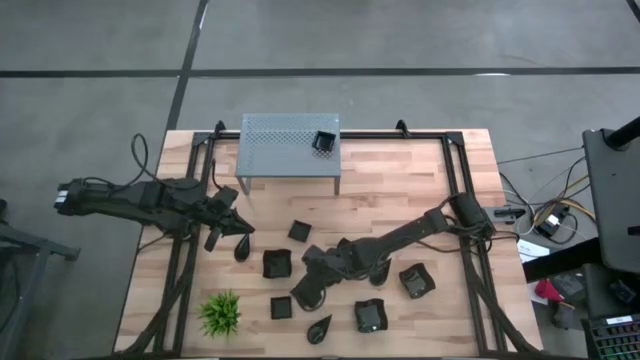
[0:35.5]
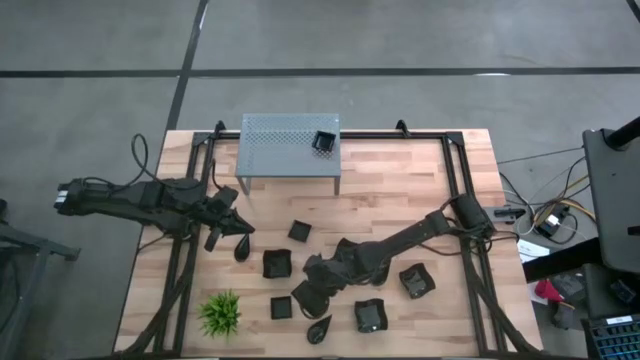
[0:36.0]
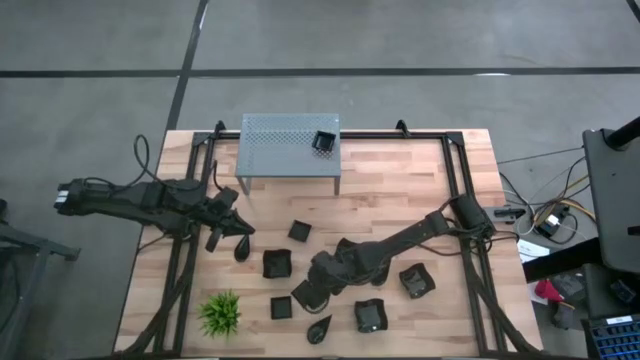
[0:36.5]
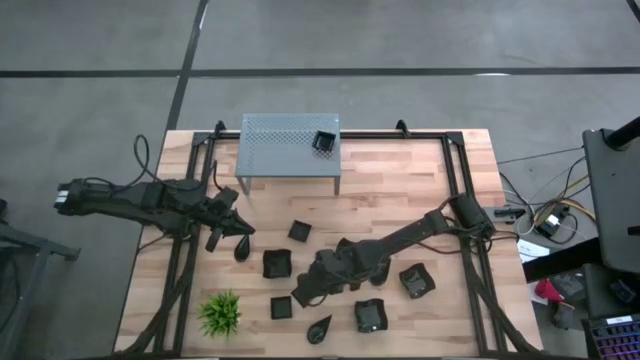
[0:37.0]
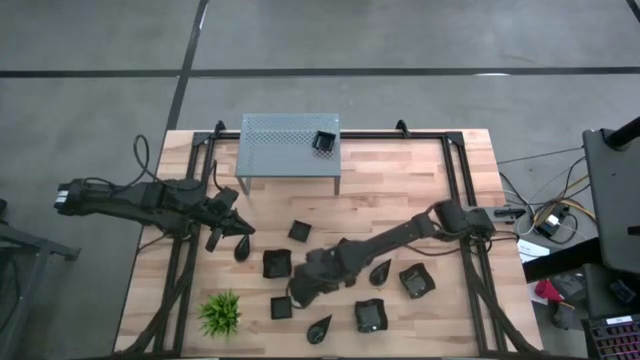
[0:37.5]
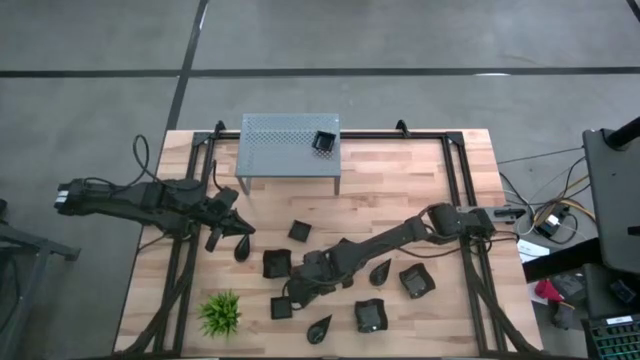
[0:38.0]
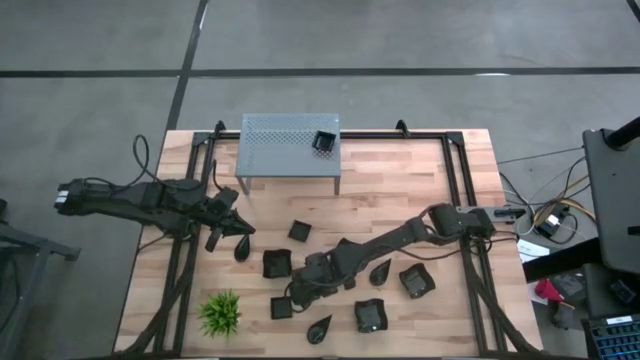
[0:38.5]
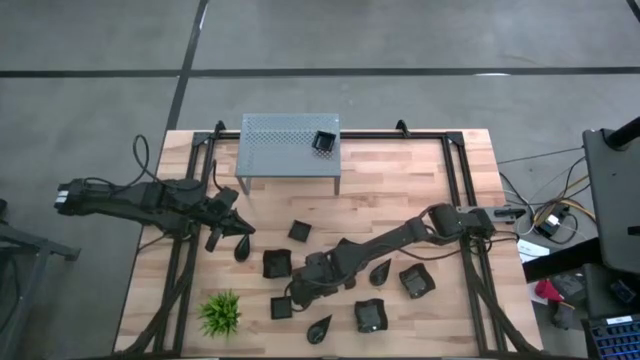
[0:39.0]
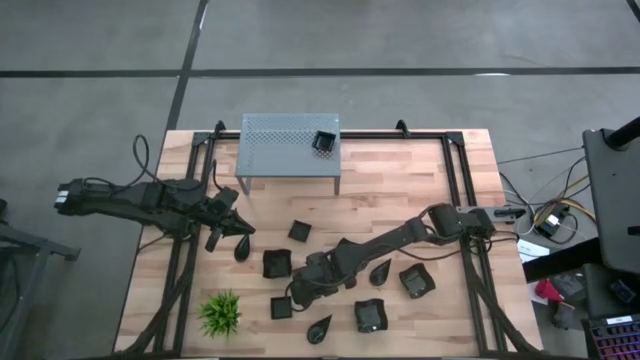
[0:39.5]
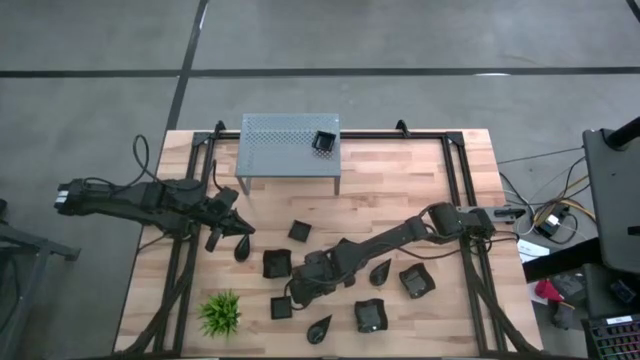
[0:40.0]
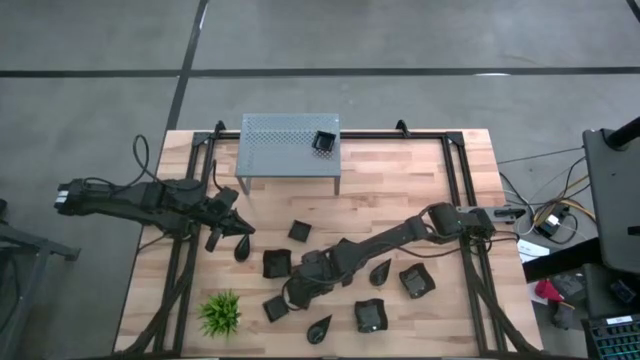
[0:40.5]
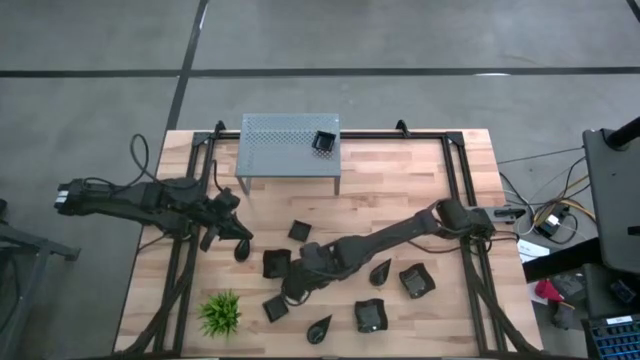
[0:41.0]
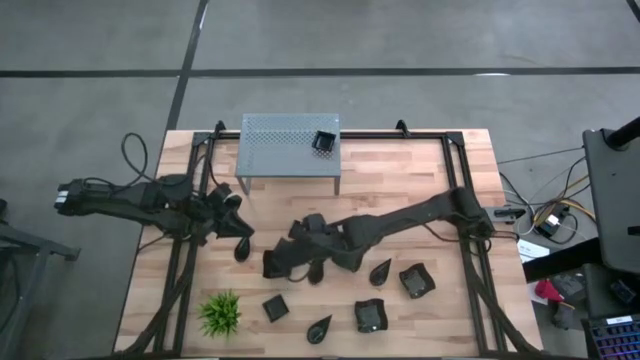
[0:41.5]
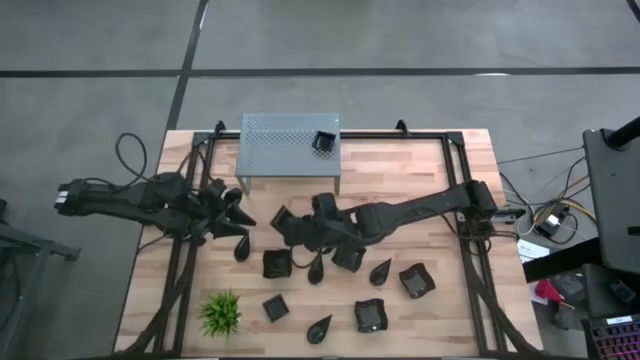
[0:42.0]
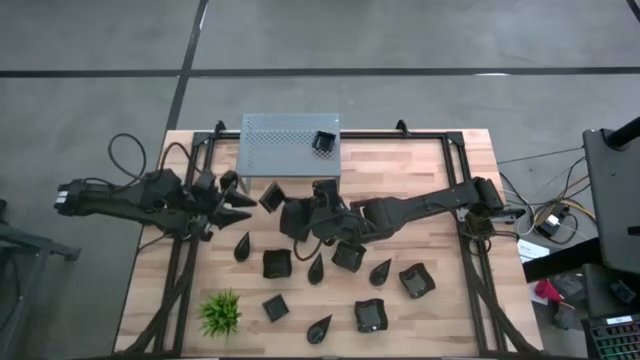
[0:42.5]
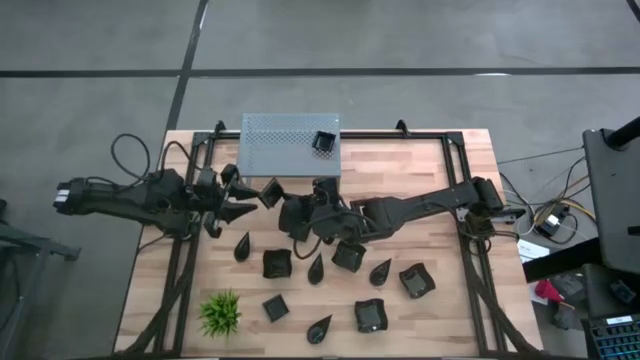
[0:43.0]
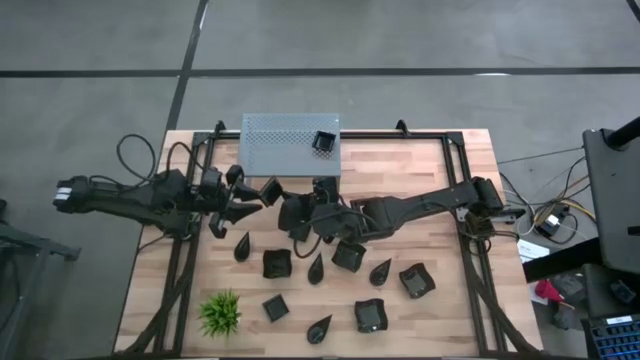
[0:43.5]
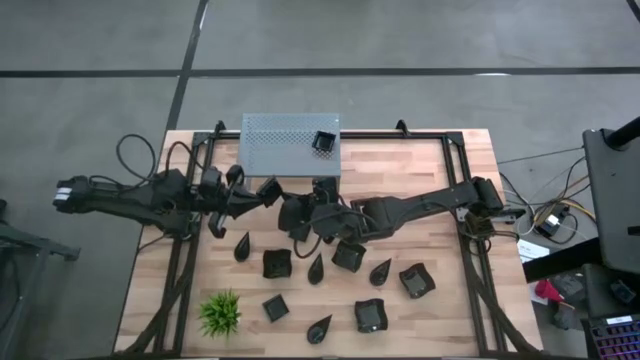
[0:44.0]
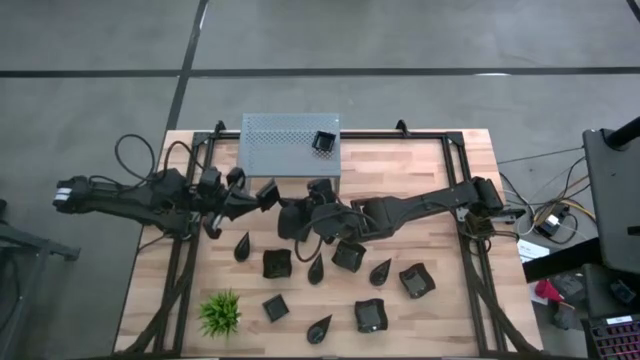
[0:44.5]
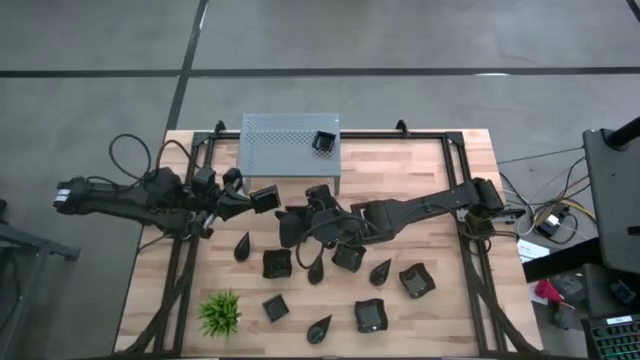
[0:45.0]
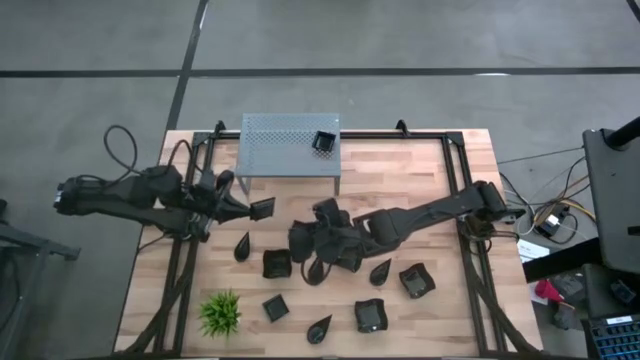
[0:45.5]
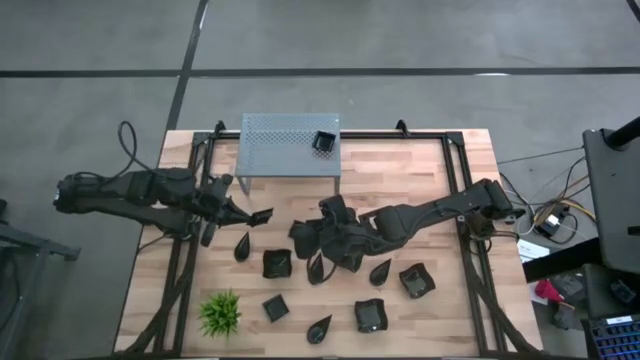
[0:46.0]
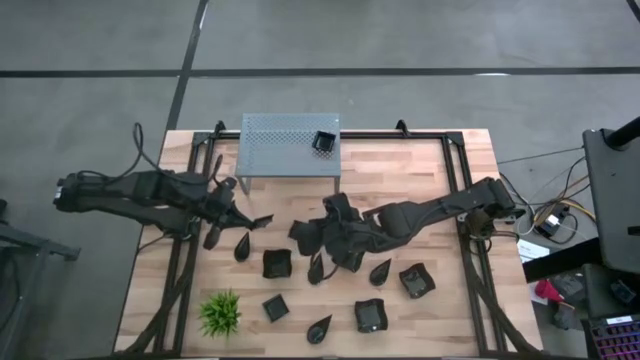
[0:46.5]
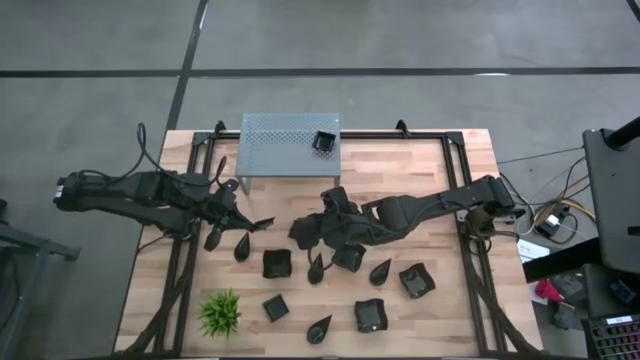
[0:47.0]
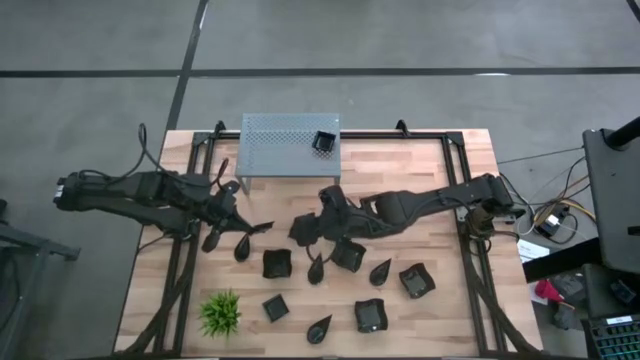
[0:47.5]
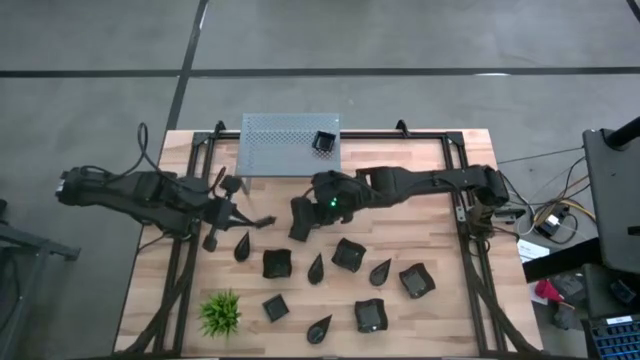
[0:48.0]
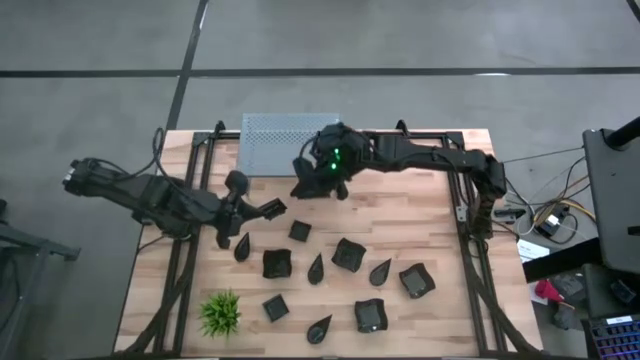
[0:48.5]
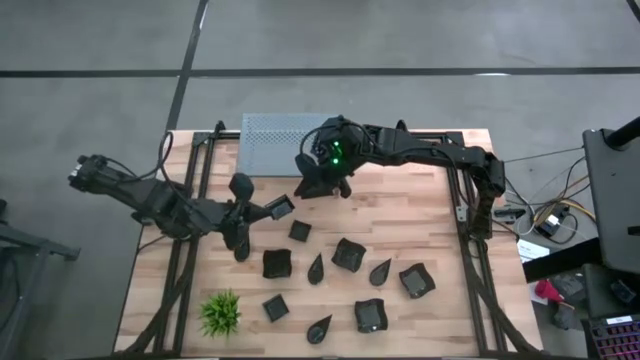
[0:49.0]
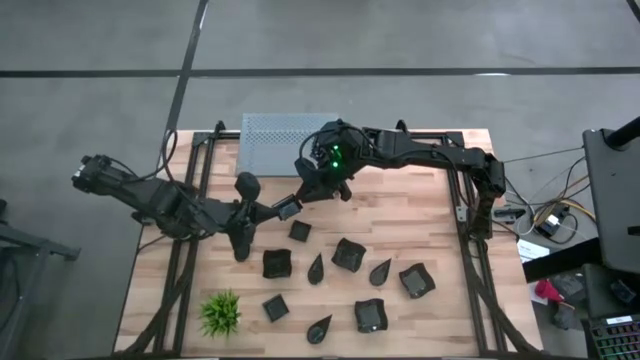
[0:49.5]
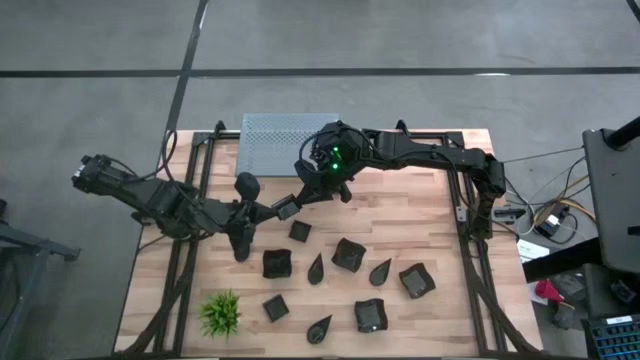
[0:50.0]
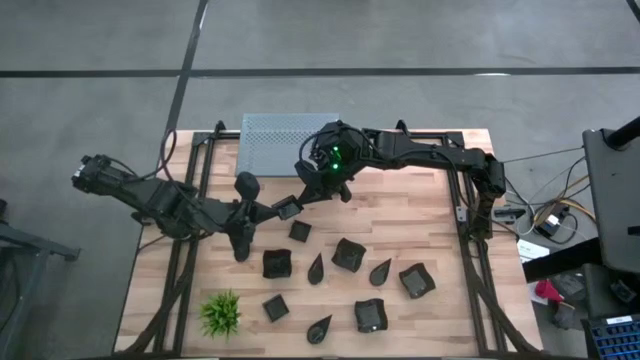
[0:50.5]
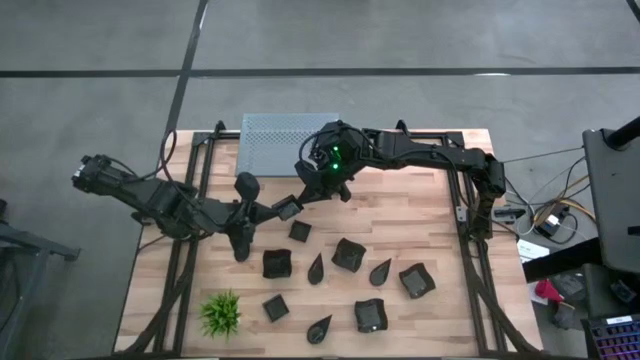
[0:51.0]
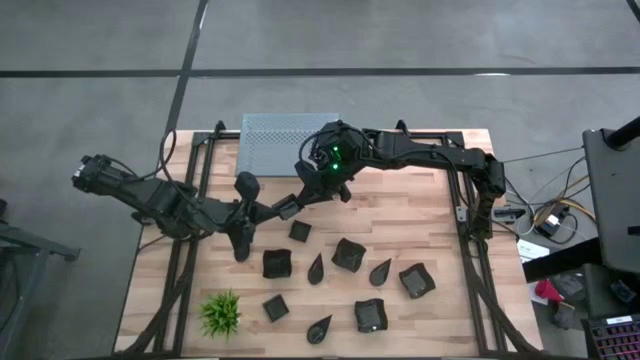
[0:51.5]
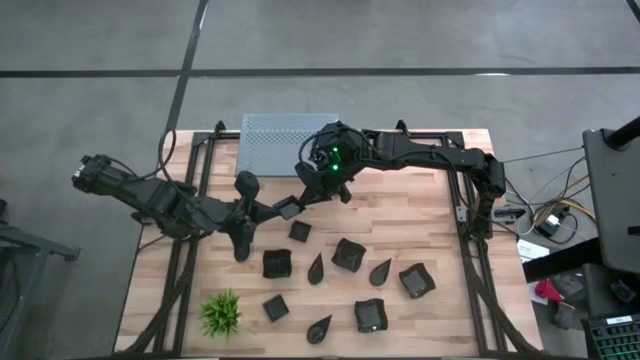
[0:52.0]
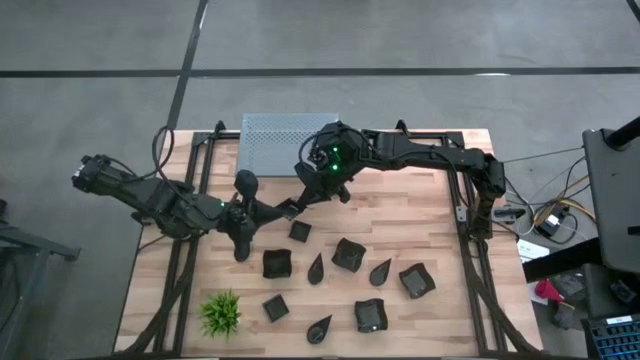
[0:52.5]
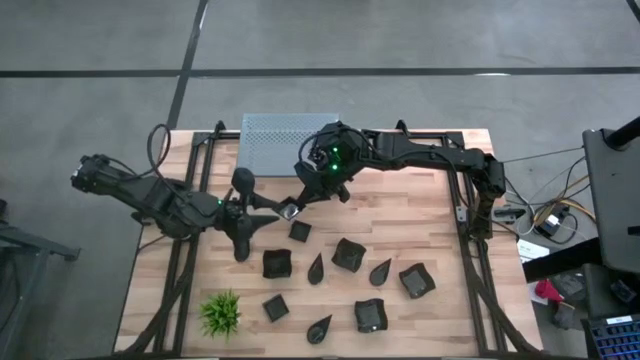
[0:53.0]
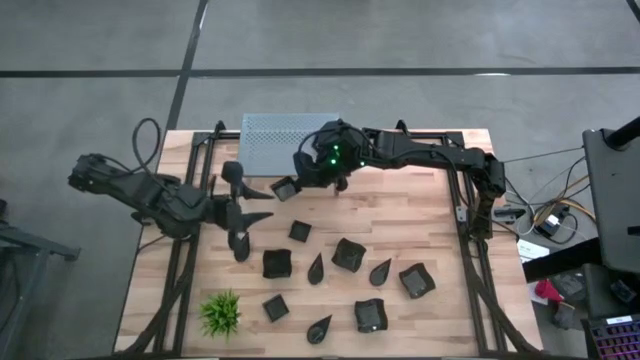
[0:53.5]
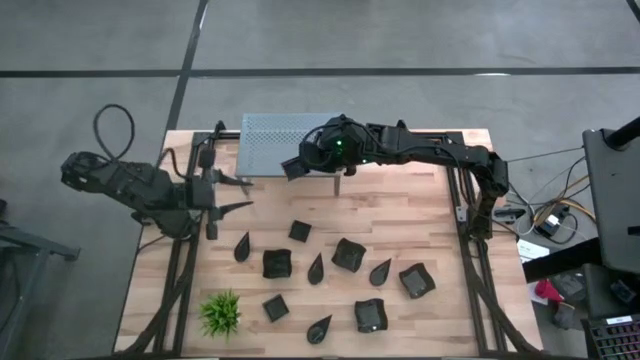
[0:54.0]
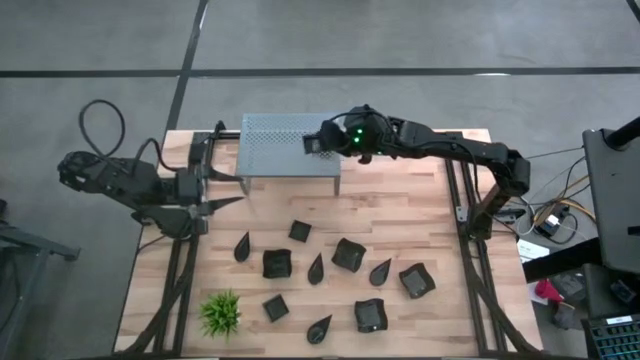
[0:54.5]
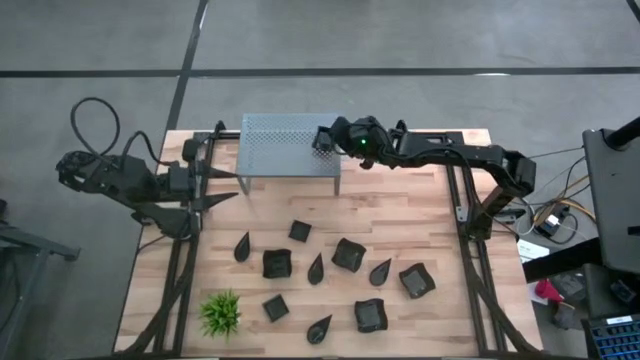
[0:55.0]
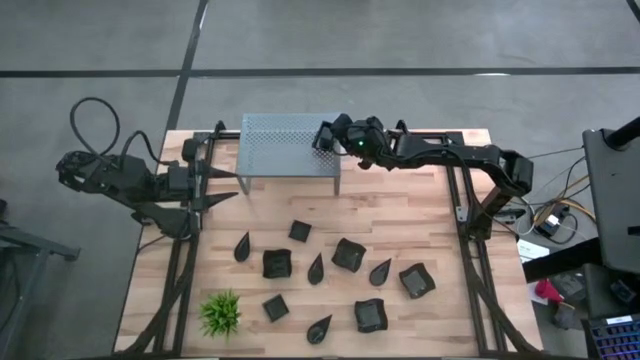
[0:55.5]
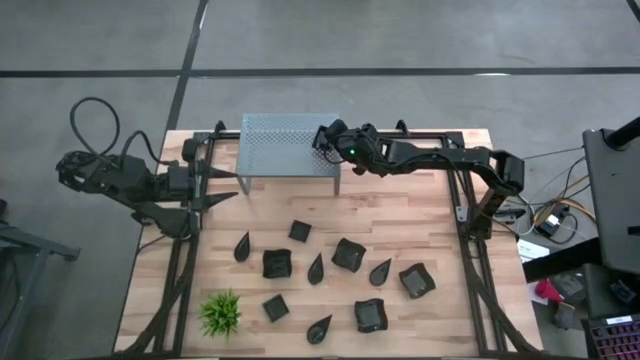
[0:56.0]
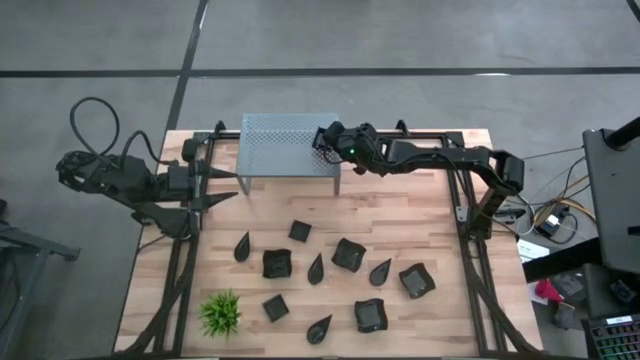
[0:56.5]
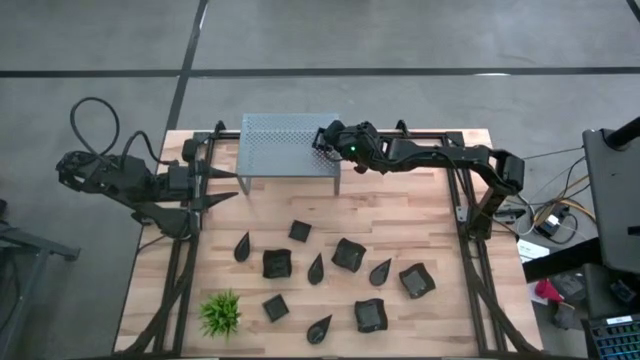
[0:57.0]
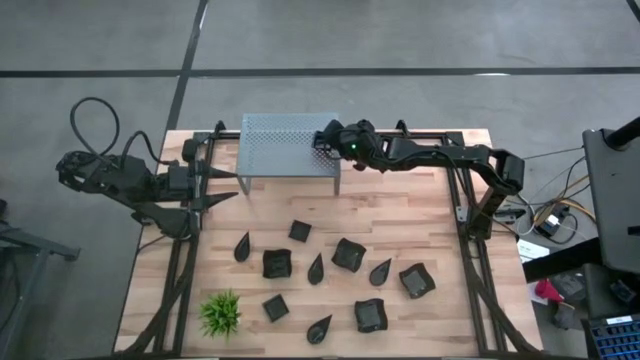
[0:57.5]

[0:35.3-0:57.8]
Task: Pick & Place Mini shaped plates
Stack the square plate on top of the other square plates on the shelf
